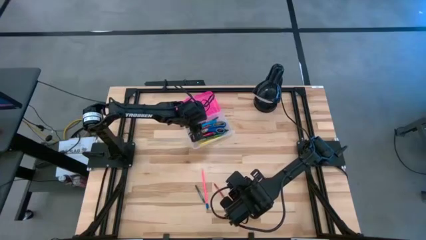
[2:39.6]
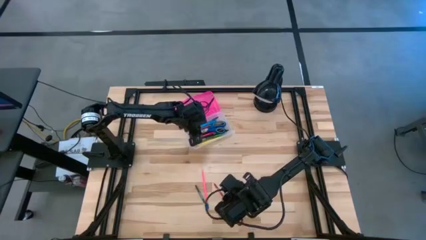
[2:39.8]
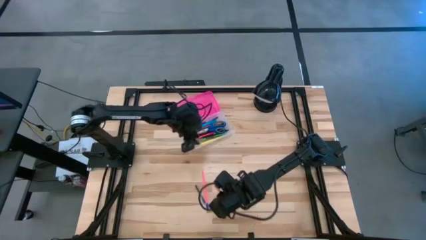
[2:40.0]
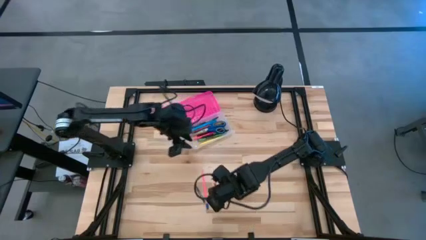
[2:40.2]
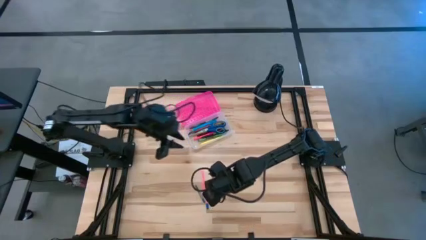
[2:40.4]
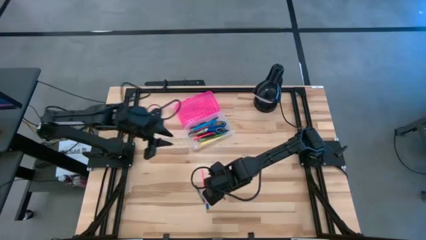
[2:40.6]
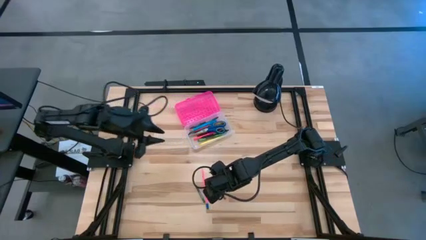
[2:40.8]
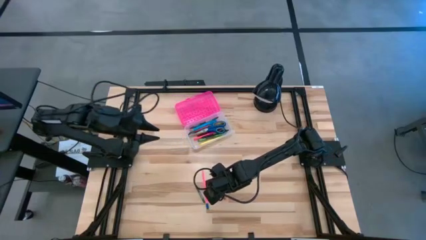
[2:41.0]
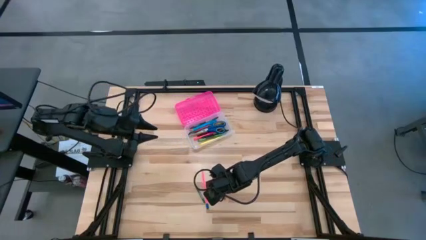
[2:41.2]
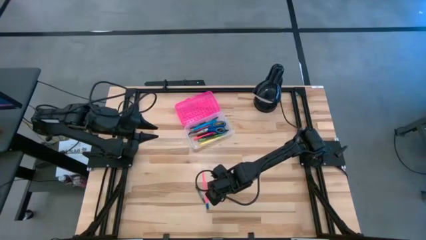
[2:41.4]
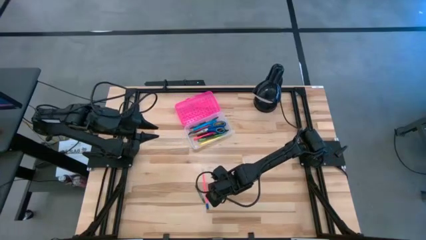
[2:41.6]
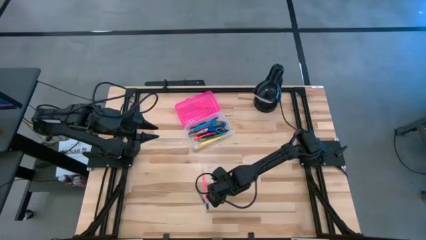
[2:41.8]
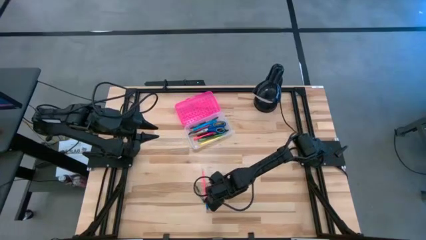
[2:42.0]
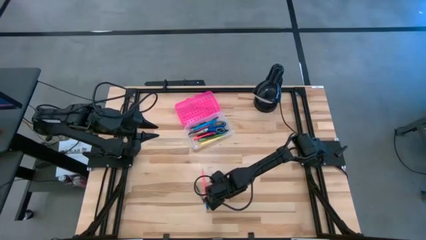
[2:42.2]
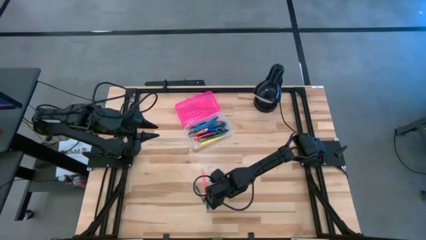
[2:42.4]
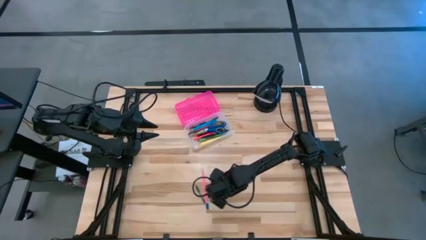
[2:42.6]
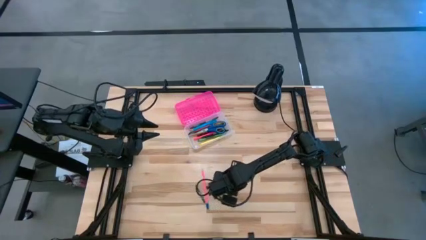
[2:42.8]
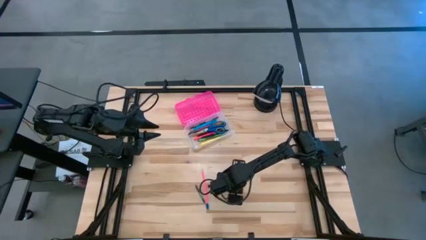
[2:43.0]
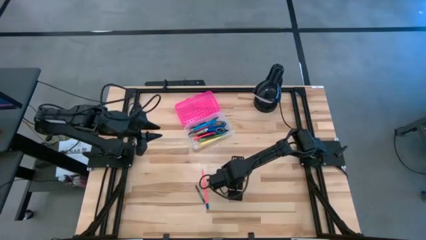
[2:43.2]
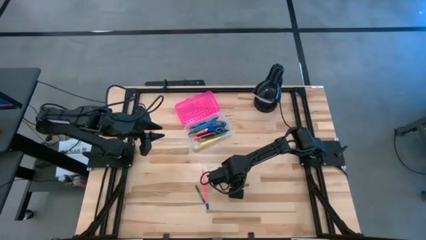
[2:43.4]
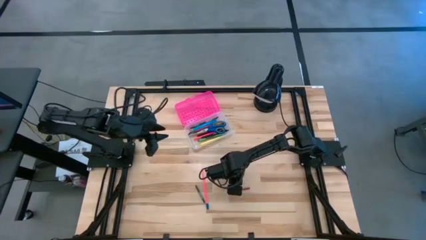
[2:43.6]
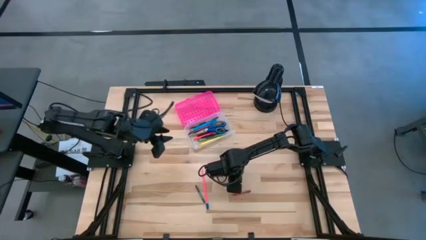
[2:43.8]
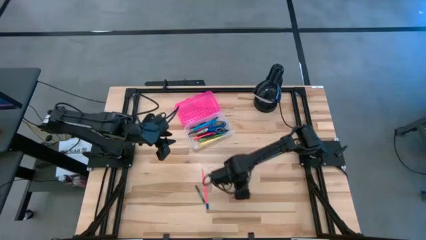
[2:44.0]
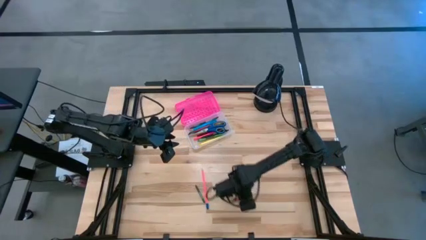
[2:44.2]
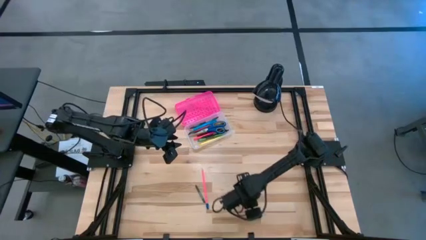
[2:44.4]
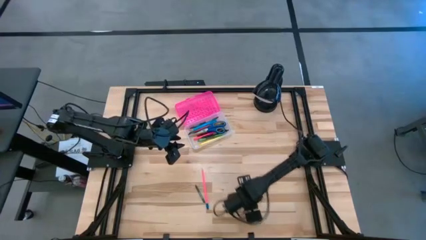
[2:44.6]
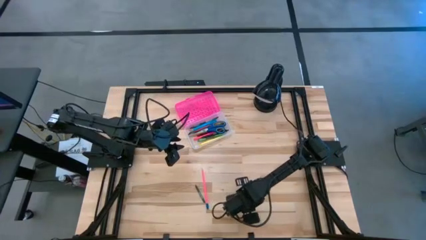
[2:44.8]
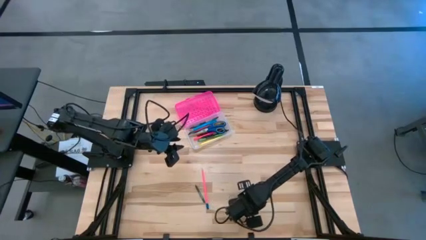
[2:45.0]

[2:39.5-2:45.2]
Task: Pick & place school supplies into a supply box
Put the red crayon into the pink supply box

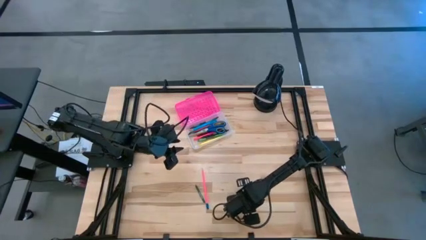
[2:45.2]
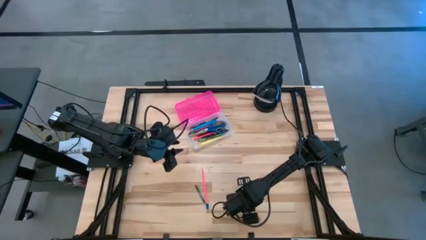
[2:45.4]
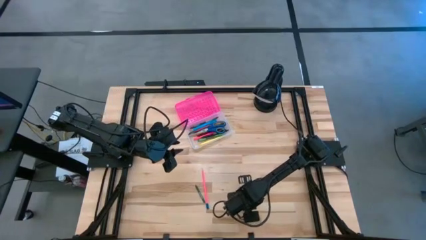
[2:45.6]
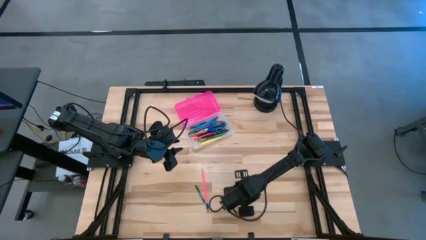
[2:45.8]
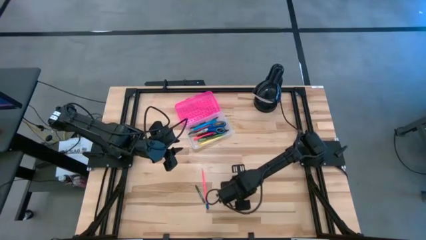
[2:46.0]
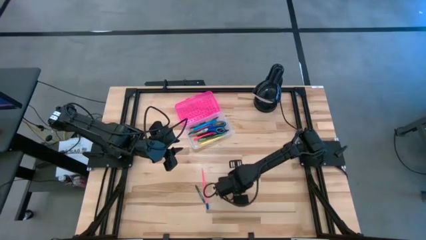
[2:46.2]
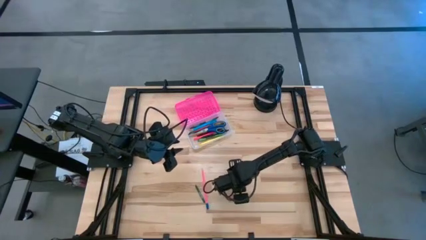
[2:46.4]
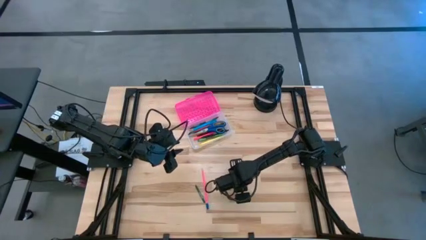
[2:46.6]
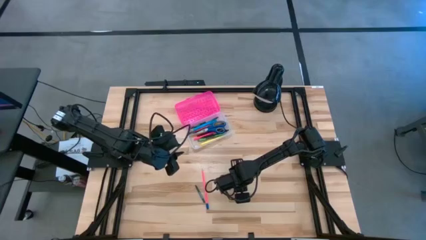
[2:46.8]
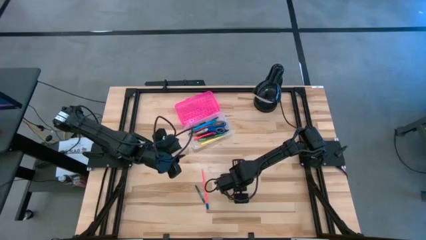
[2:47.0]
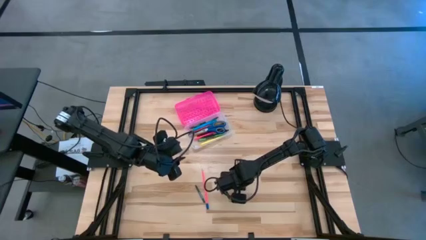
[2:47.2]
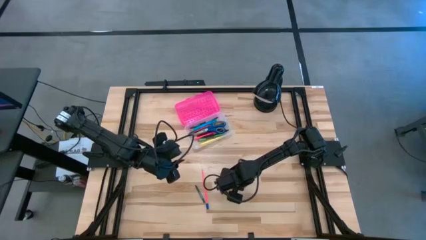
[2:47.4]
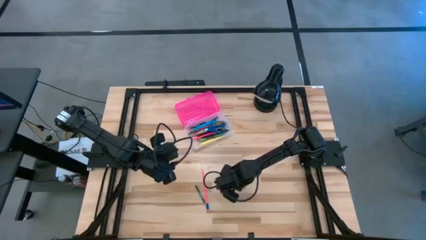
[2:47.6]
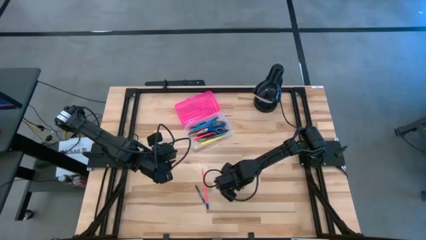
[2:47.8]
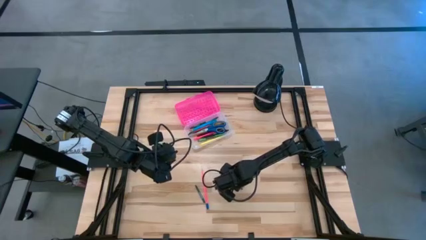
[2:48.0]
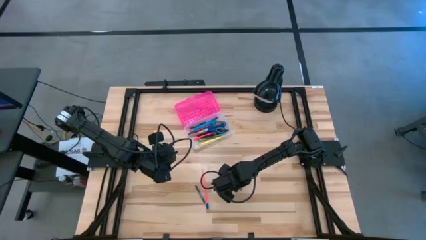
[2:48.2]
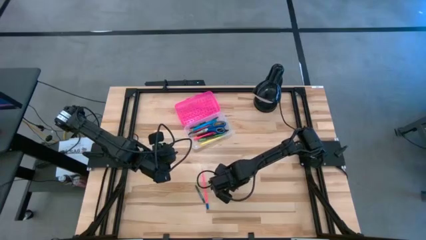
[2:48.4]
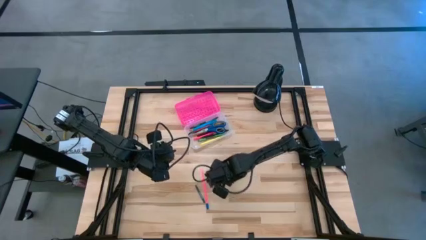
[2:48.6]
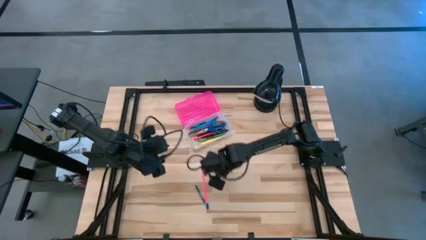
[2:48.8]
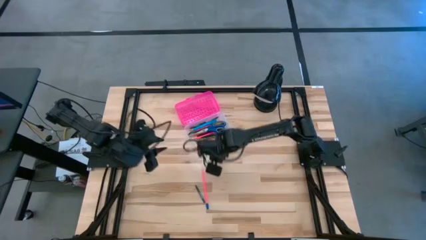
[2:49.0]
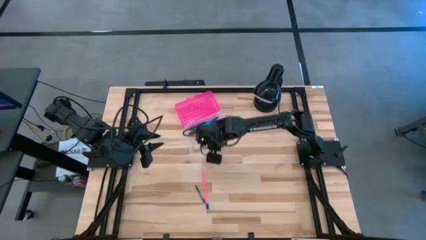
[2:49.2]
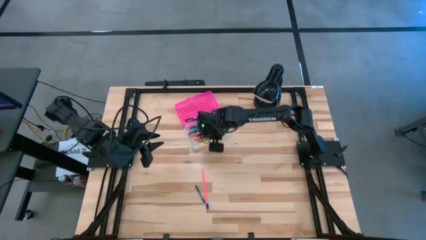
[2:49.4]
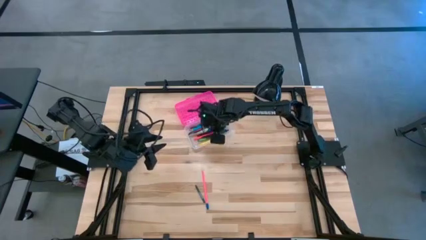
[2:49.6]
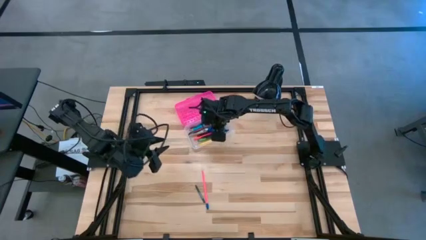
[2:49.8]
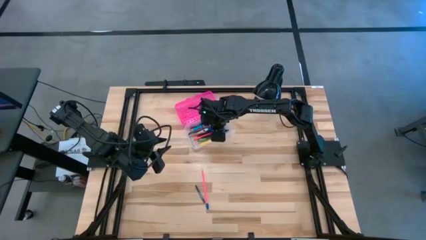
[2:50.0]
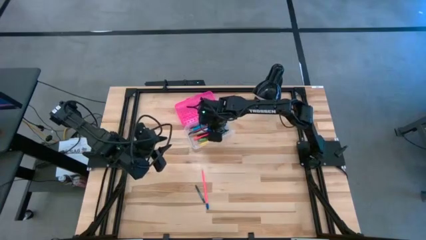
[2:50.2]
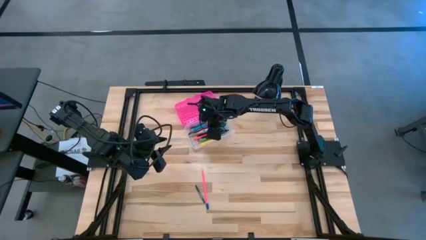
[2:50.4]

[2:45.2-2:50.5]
Put the red crayon into the pink supply box

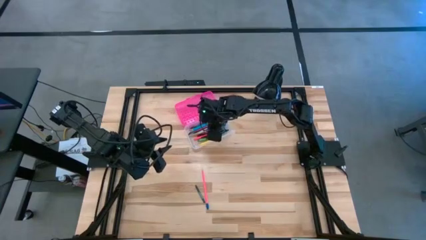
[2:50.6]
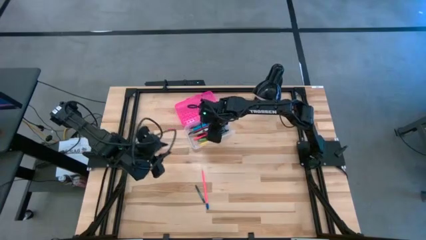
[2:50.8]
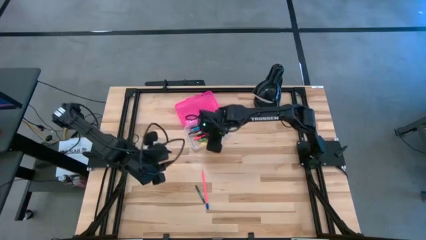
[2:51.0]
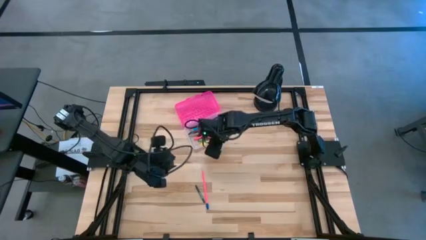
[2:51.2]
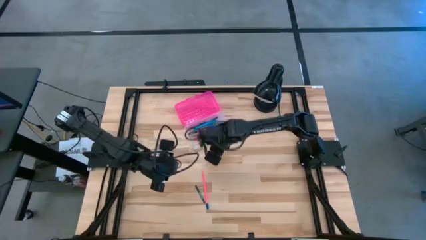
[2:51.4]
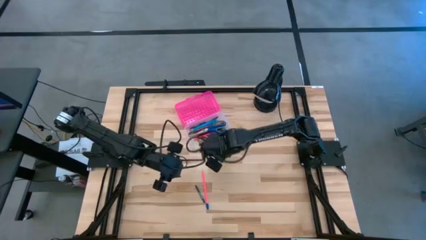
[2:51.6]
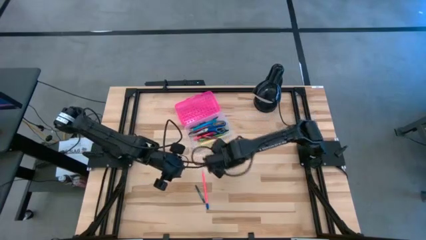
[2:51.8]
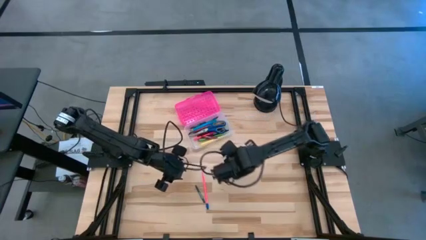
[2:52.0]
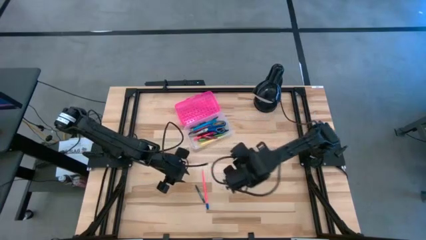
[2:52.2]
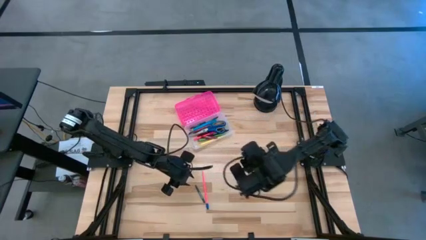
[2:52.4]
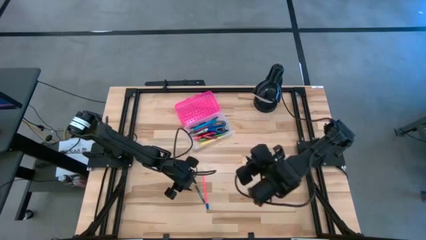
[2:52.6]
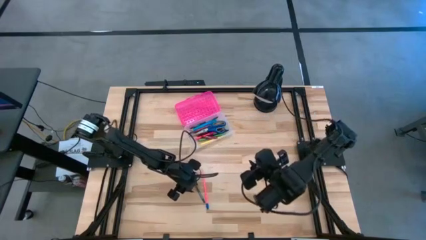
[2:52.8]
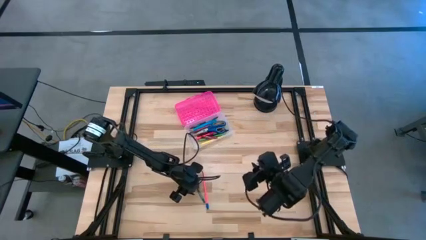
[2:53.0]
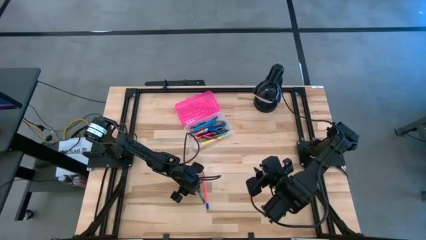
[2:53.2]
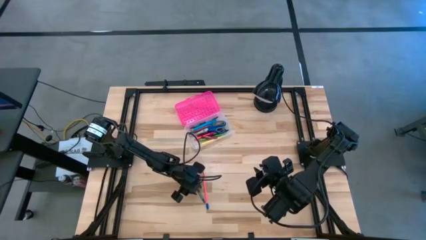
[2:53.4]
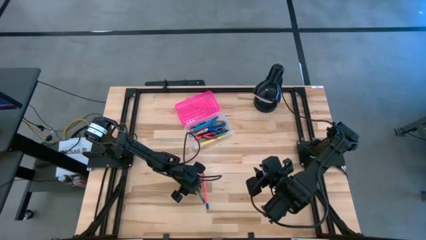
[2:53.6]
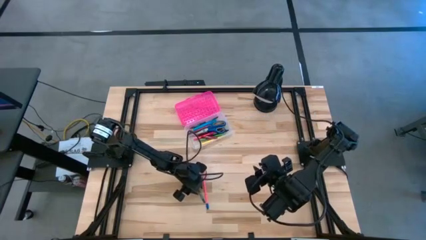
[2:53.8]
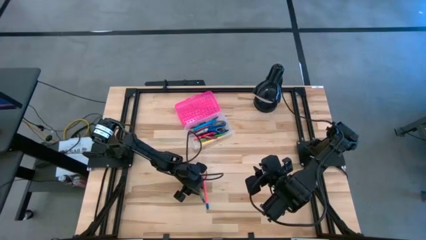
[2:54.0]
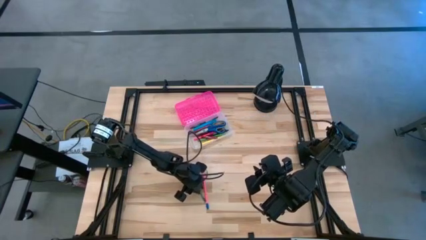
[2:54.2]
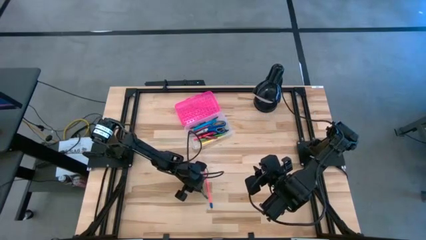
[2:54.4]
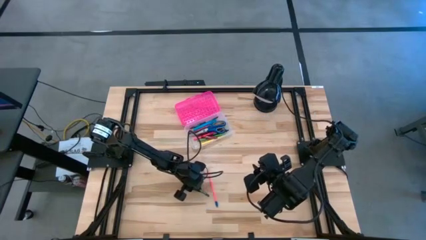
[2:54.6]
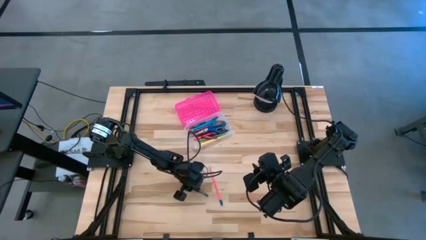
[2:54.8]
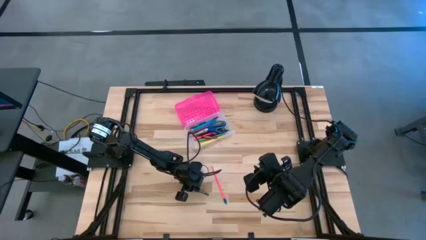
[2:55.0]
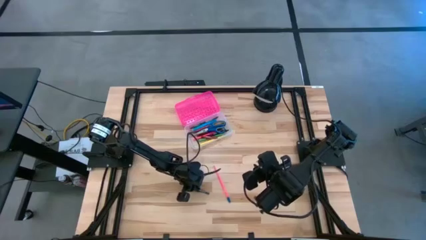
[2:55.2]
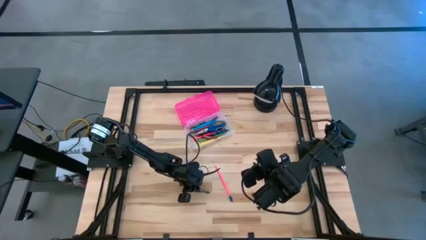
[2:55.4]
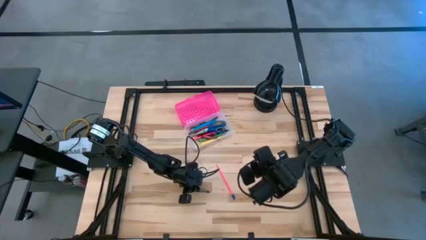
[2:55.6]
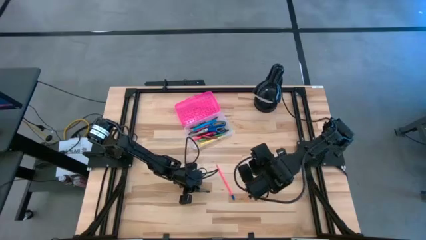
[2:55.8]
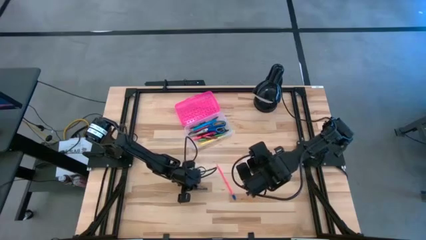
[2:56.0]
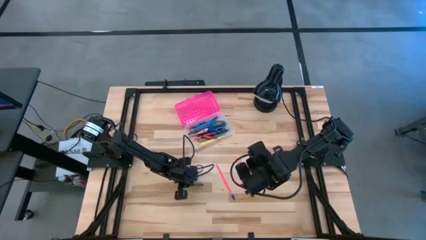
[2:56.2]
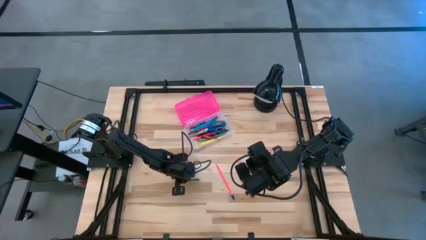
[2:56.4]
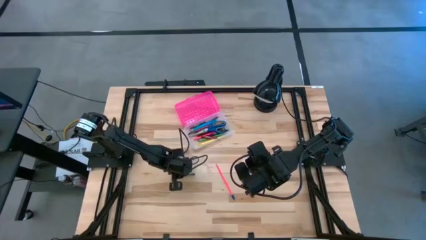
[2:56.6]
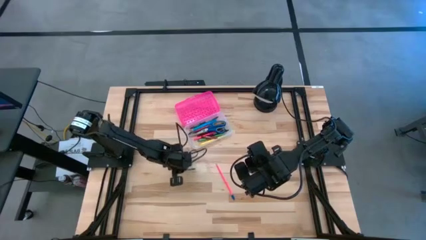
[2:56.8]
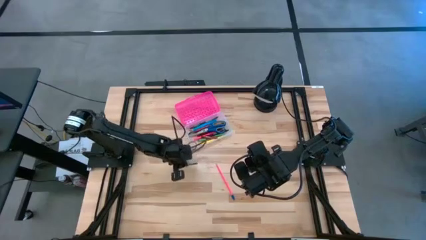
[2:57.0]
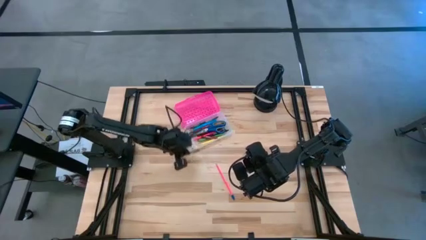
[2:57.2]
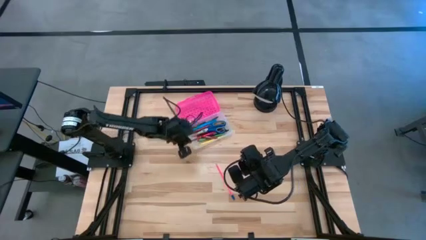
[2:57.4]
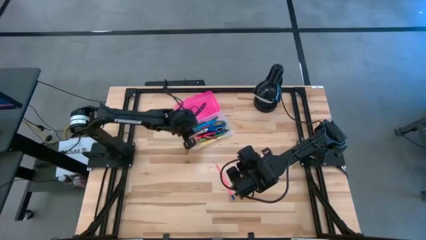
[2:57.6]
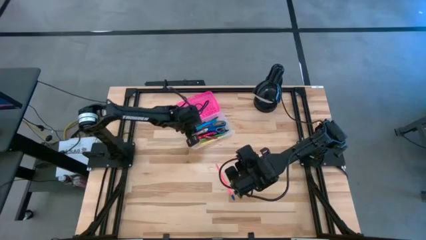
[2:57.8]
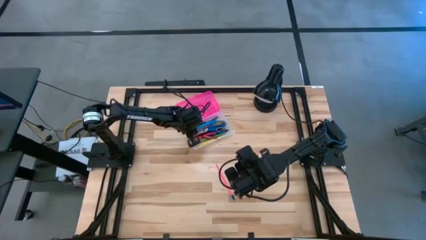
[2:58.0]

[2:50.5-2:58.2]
Put the green crayon into the pink supply box
